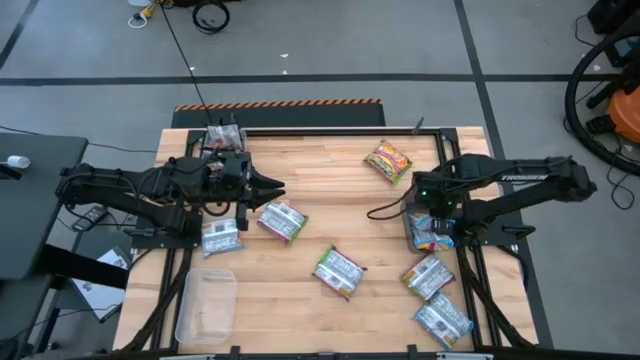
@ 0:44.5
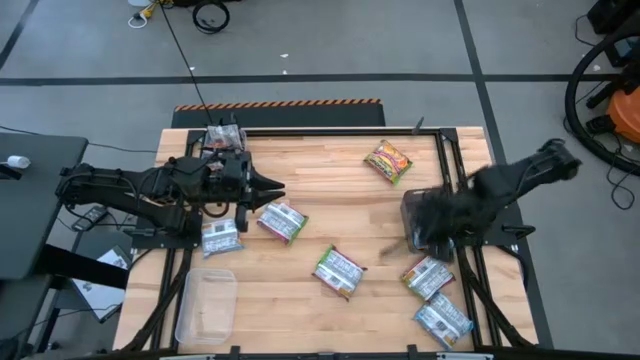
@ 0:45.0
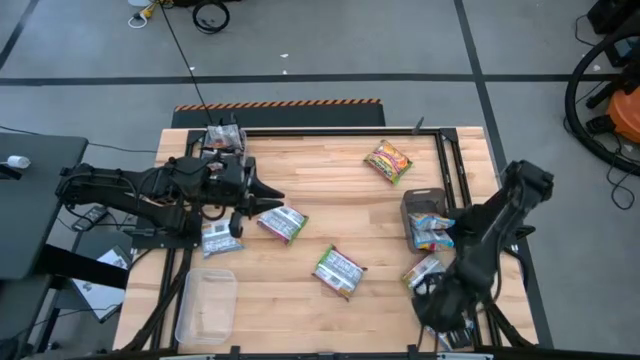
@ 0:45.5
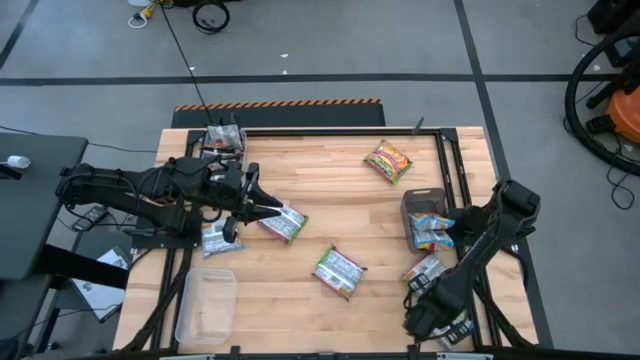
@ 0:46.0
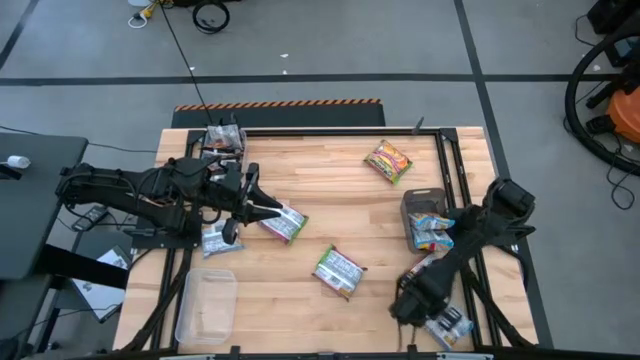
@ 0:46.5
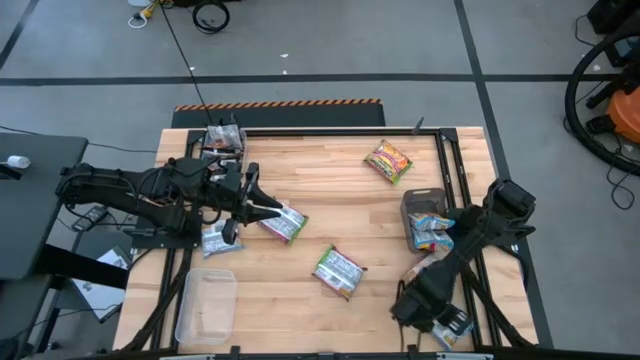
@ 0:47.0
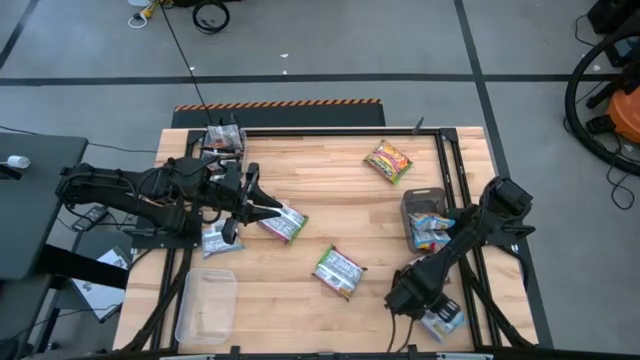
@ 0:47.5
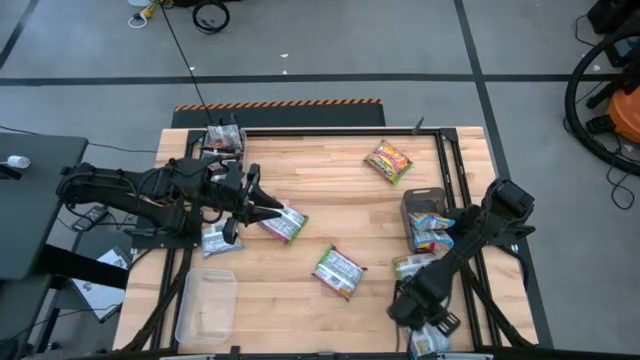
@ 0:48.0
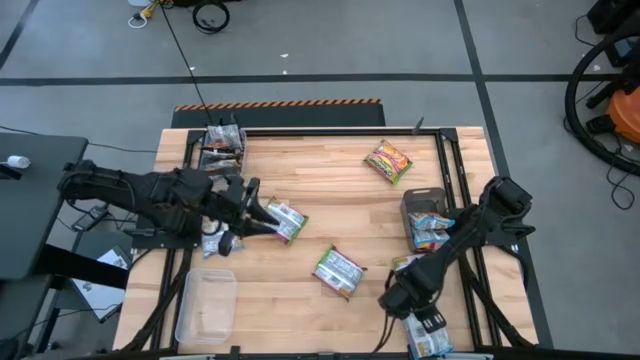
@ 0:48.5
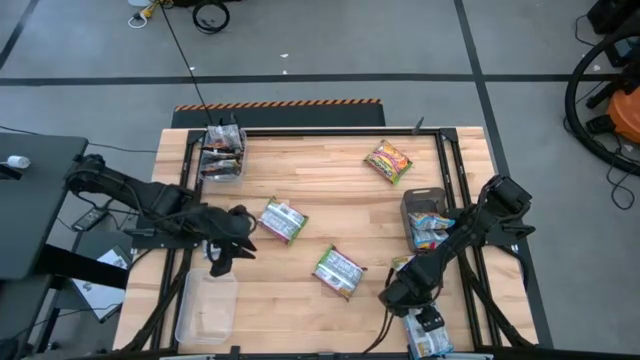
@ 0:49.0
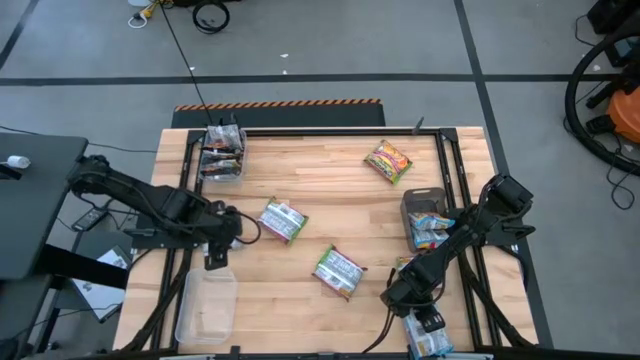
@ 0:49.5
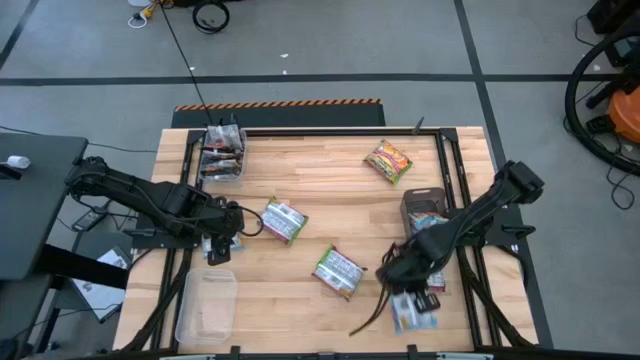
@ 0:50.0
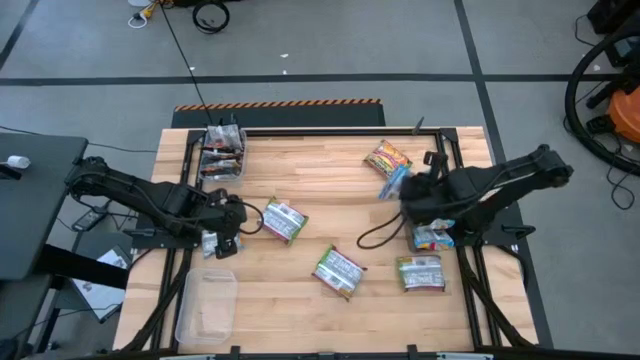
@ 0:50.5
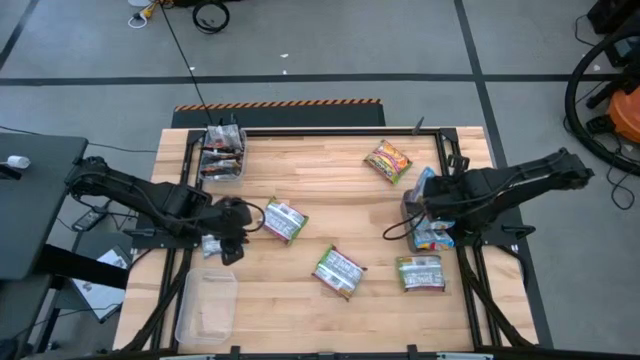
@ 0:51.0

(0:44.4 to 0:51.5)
Task: Sort Maruchan noodles
Put the blue noodle pack into the black bin

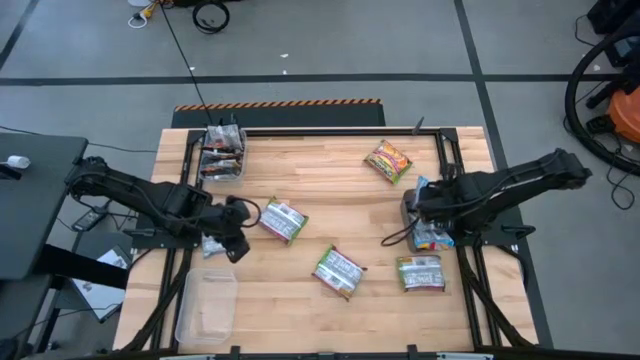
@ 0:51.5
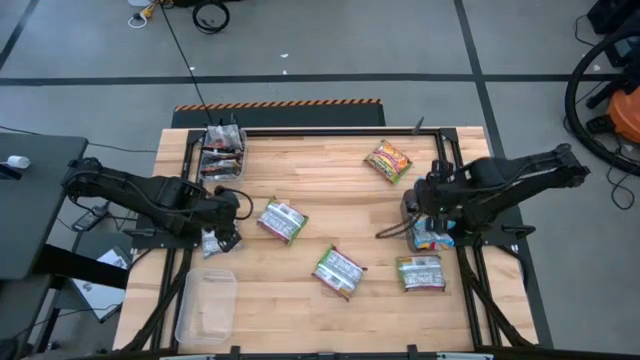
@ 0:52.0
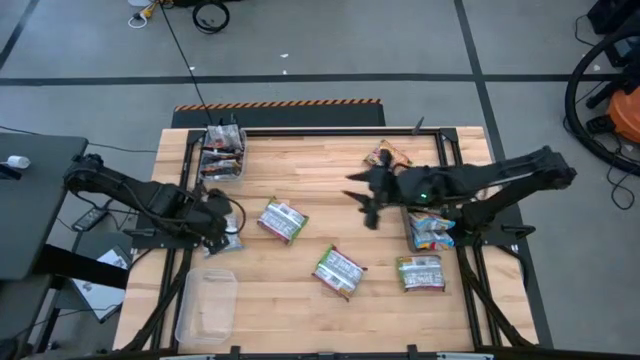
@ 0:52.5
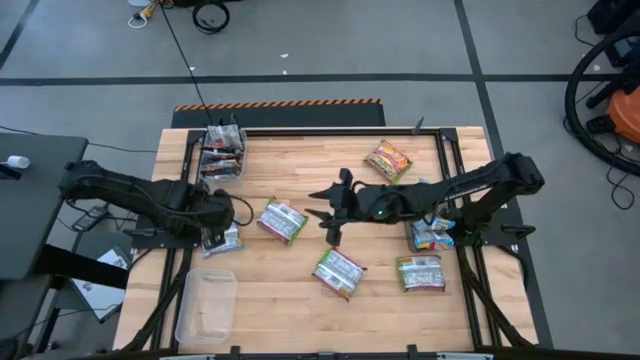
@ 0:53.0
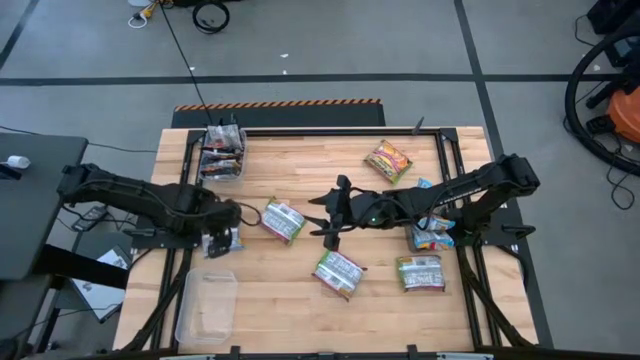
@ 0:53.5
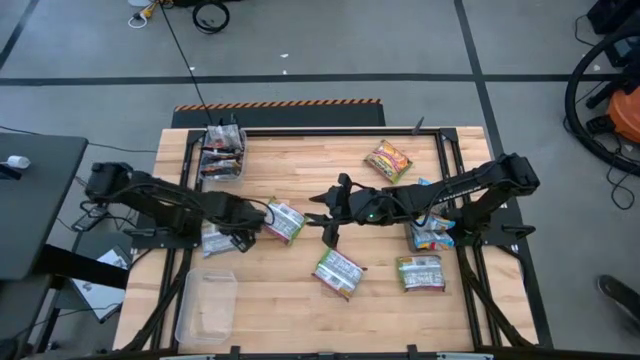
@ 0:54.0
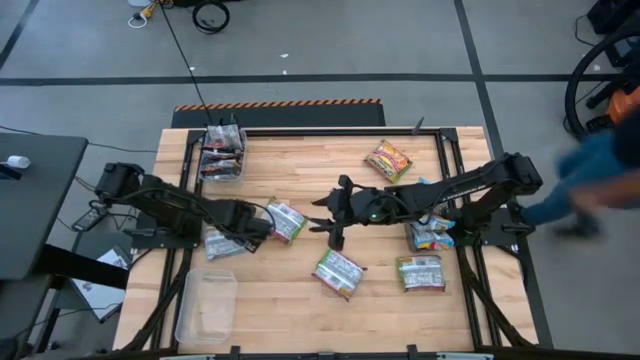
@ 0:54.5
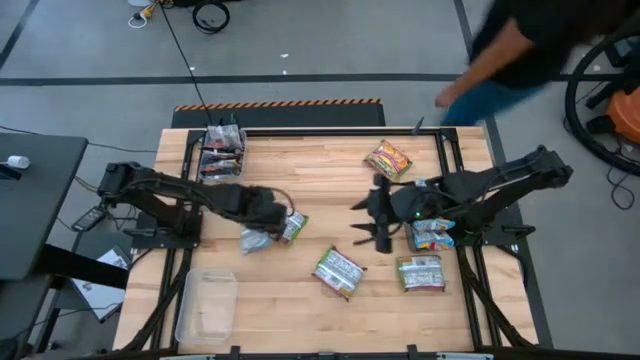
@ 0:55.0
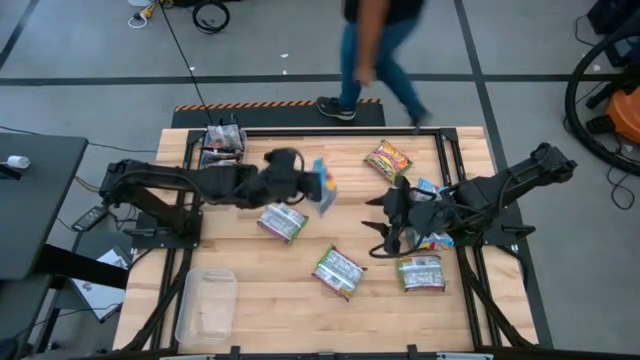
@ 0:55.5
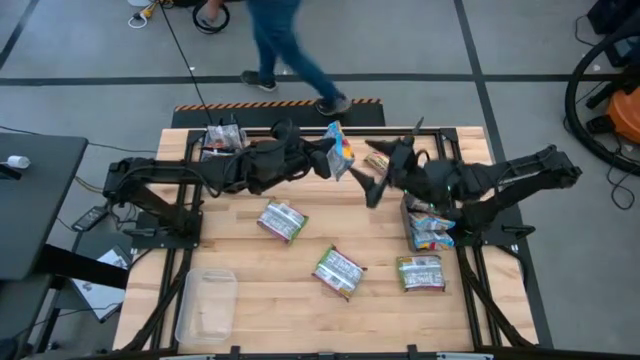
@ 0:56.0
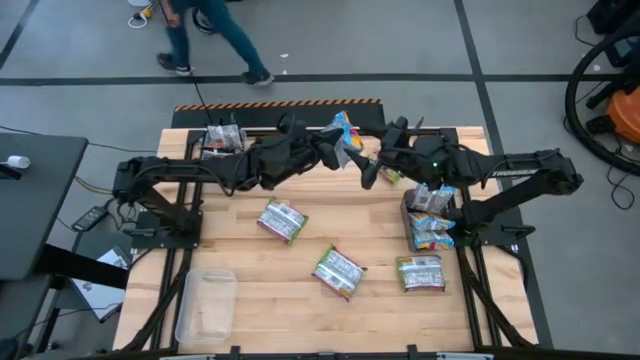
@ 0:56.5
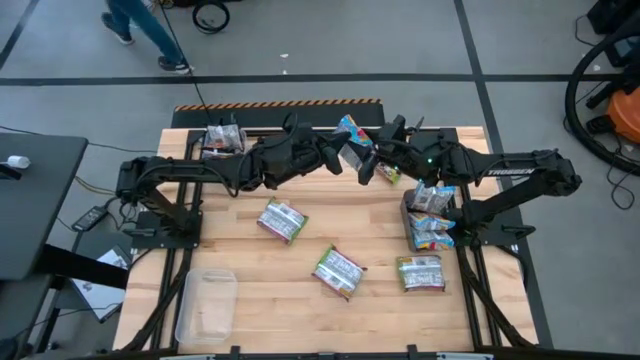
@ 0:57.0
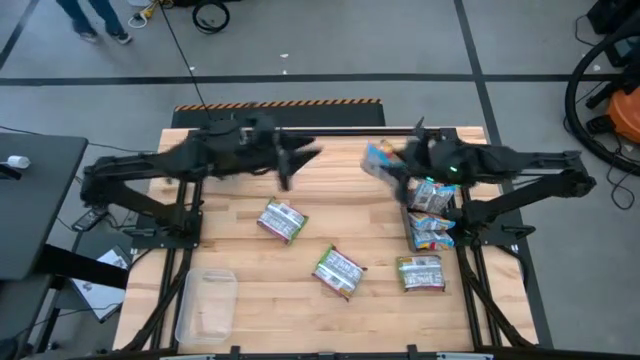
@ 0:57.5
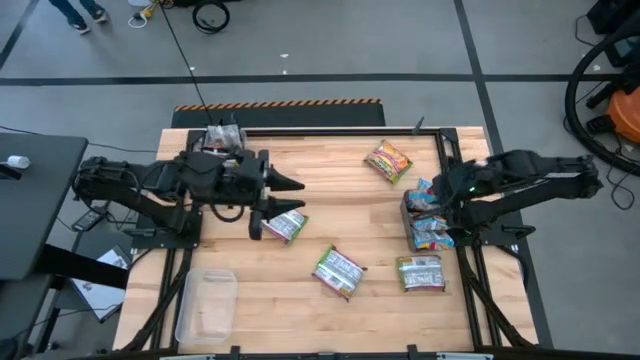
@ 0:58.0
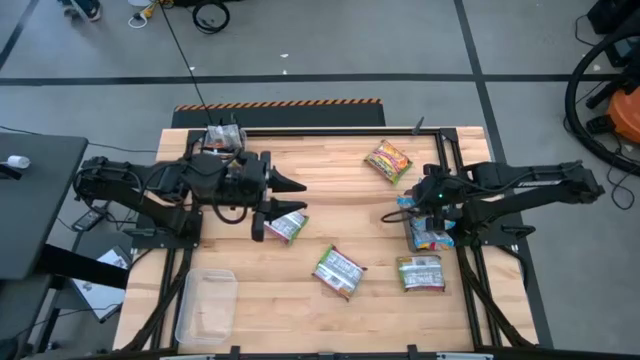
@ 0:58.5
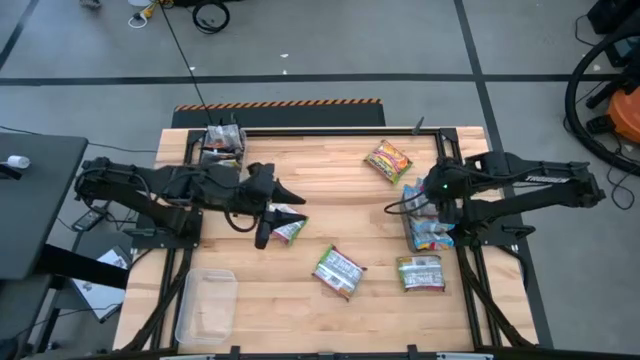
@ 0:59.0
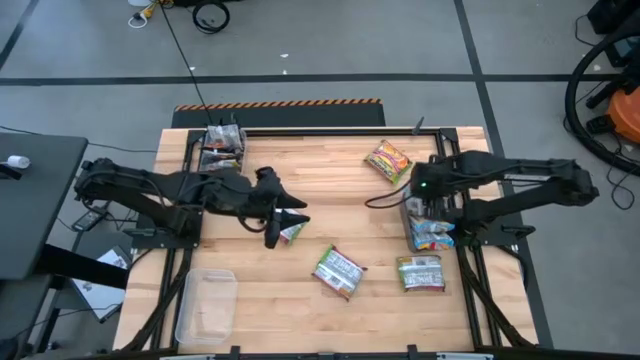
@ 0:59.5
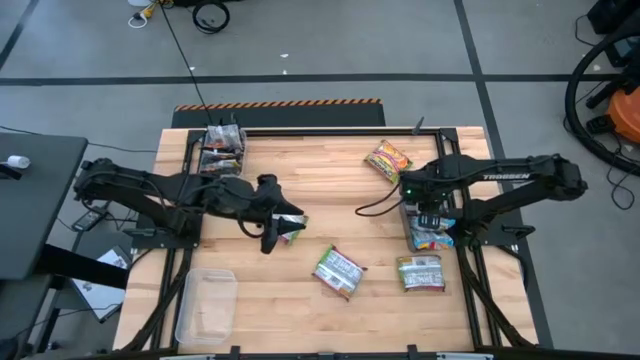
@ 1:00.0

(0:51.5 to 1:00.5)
Put the blue noodle pack into the black bin

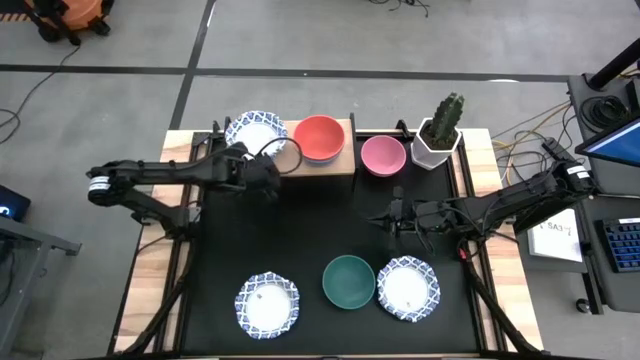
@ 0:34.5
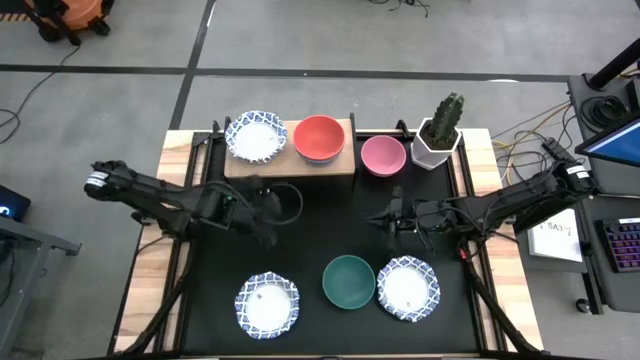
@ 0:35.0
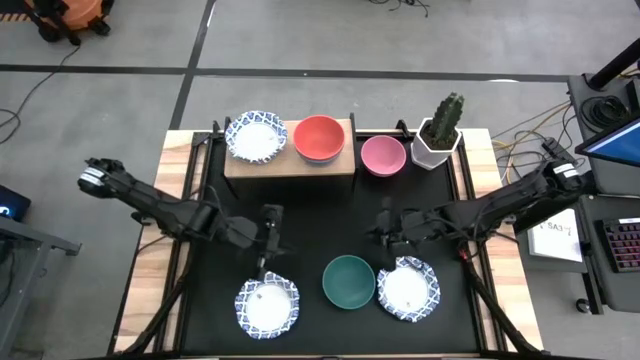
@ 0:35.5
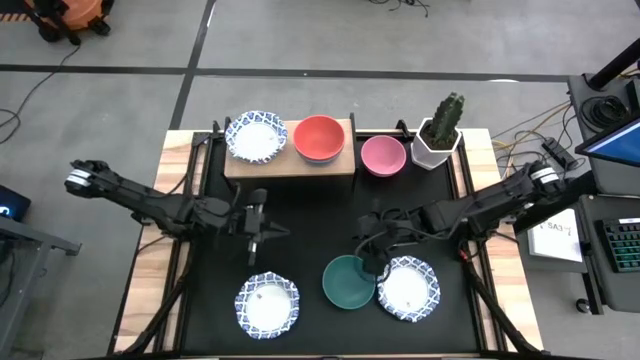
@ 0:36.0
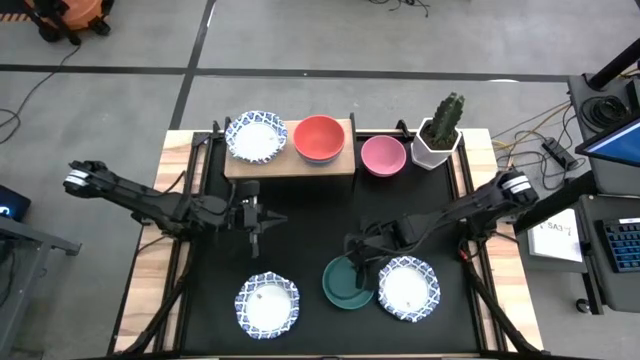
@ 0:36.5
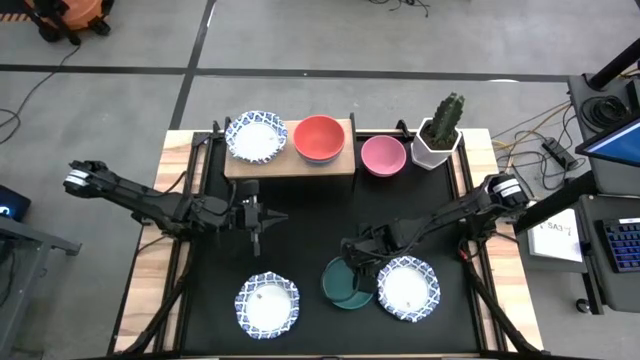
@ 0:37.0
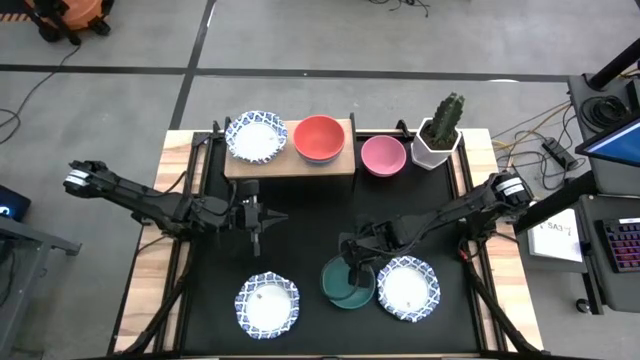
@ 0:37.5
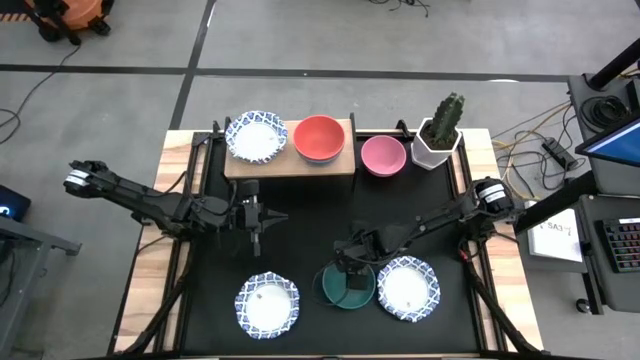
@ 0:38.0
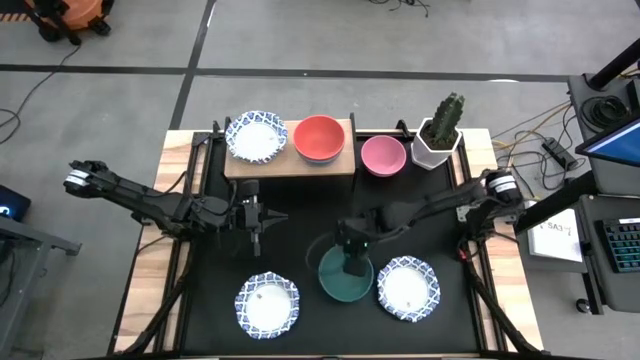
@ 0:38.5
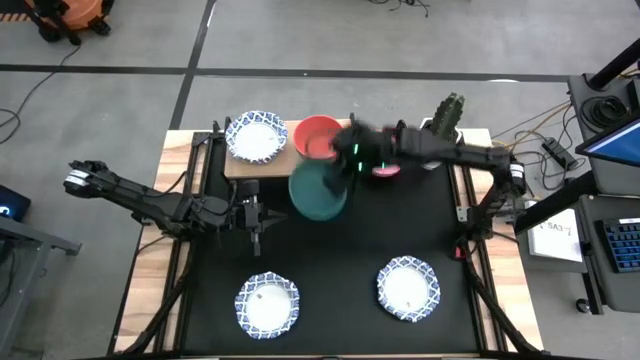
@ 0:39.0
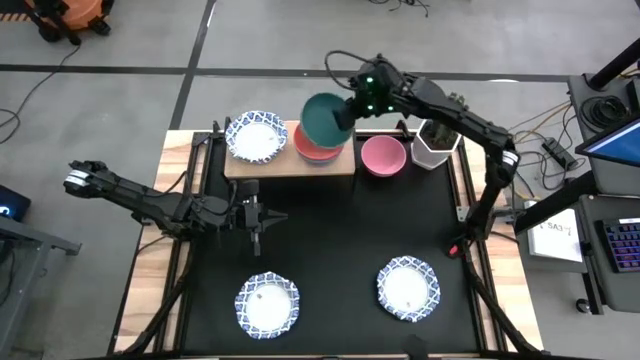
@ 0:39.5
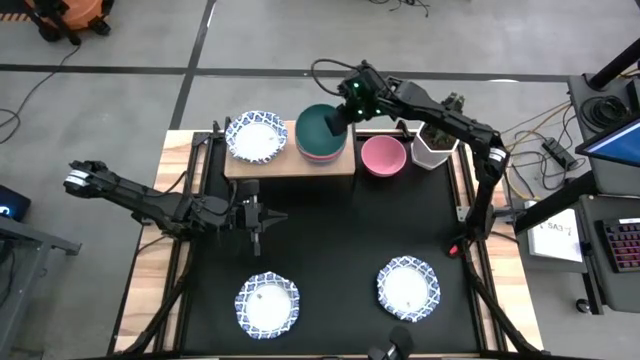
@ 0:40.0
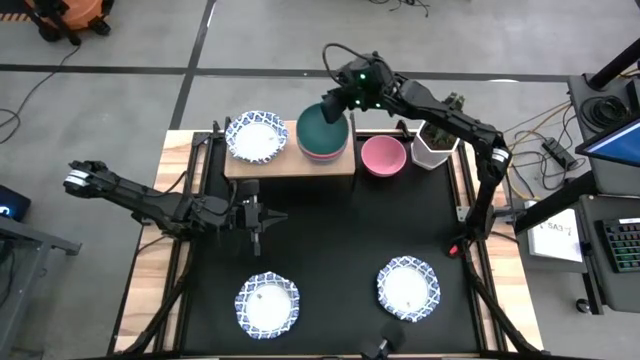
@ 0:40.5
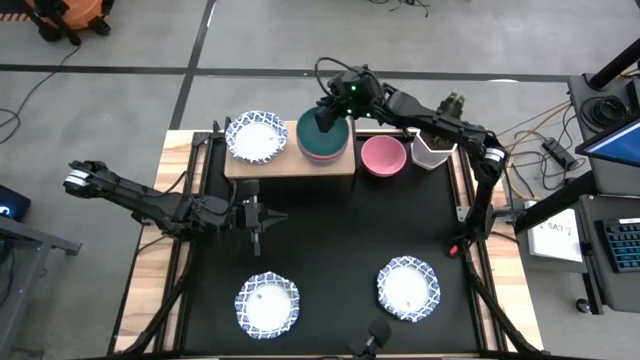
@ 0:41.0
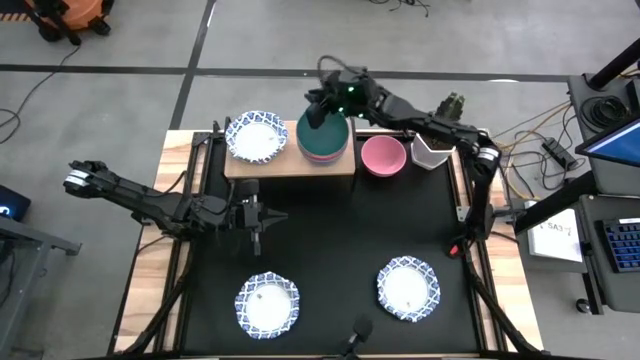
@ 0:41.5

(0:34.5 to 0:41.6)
Task: Place and stack bowls onto a shelf
Stack the green bowl on top of the orange bowl on the shelf
